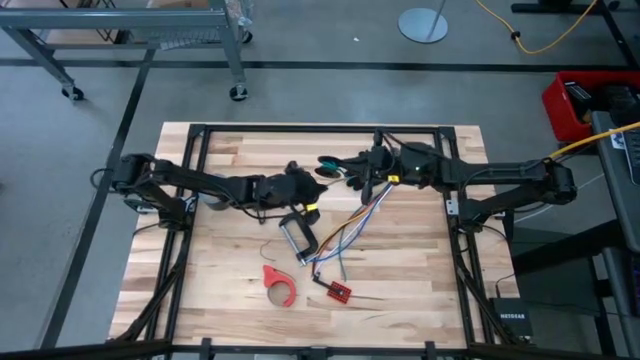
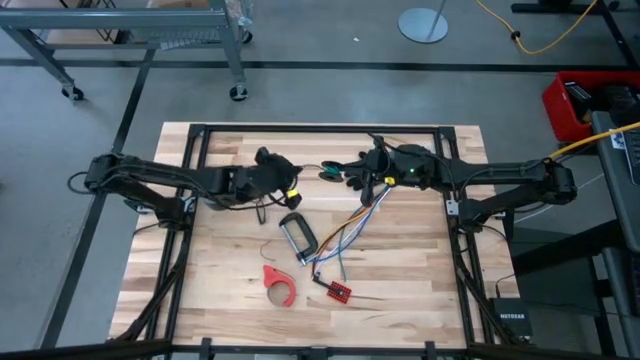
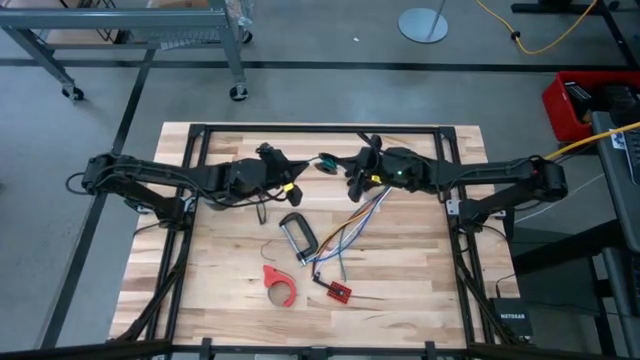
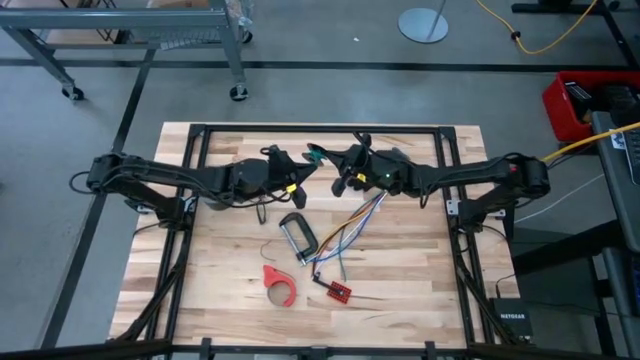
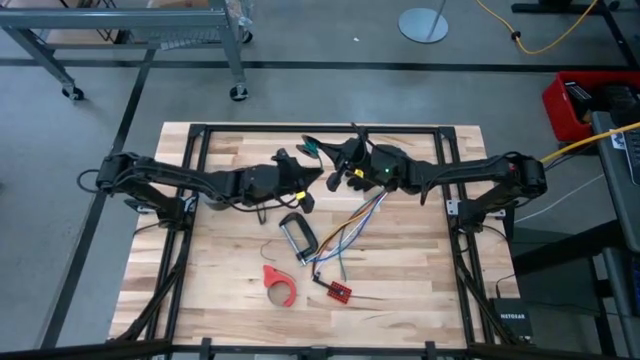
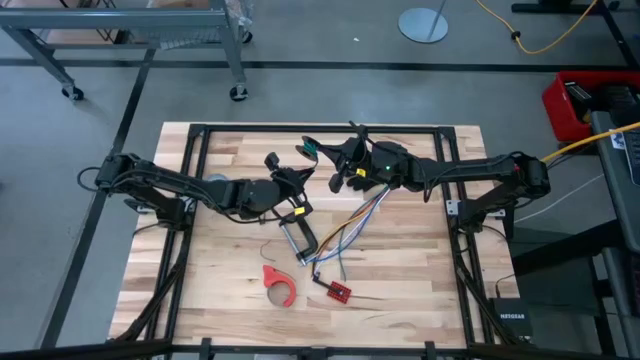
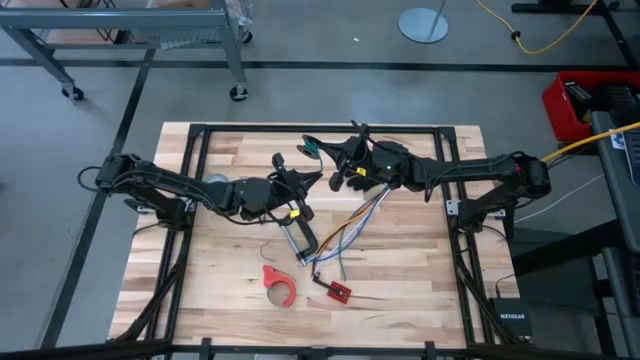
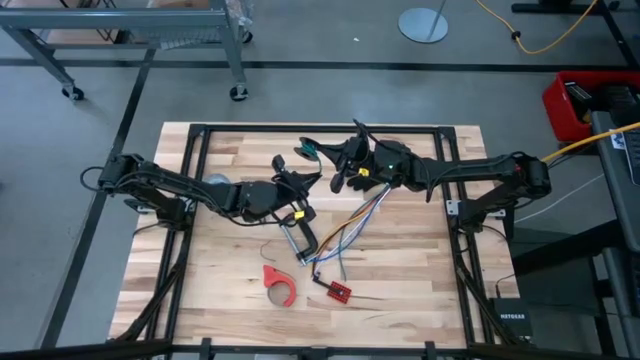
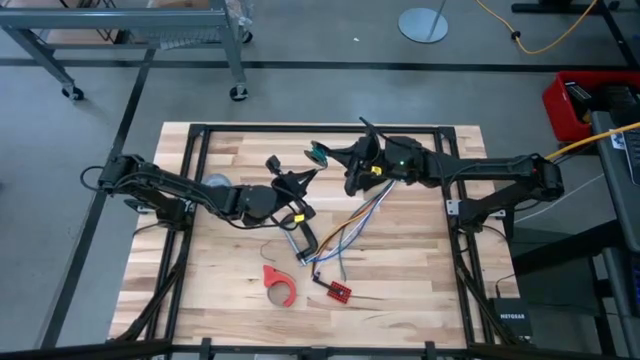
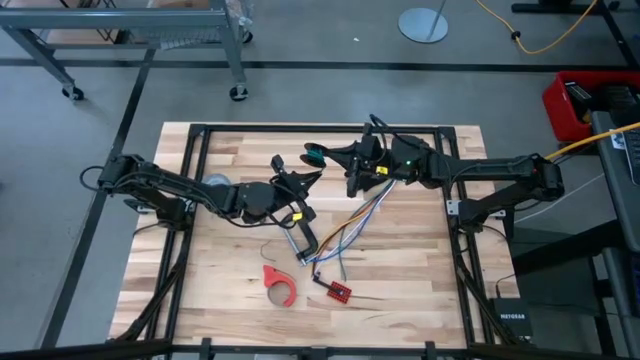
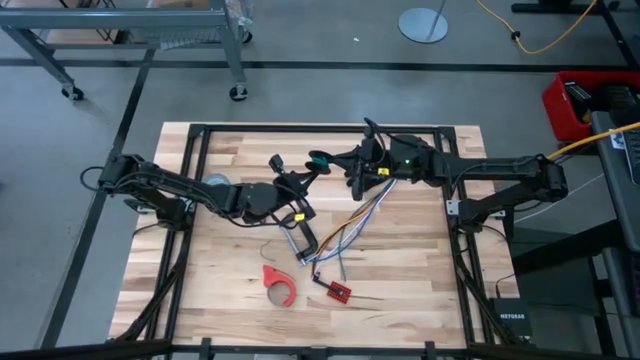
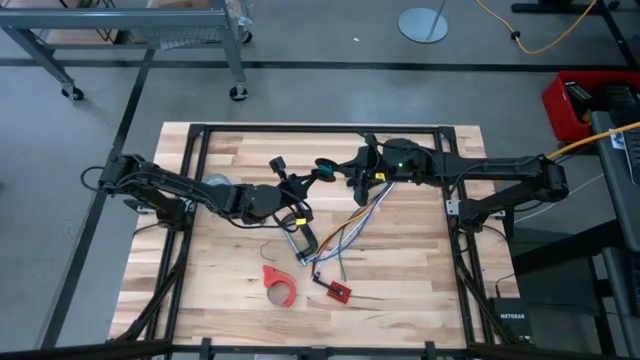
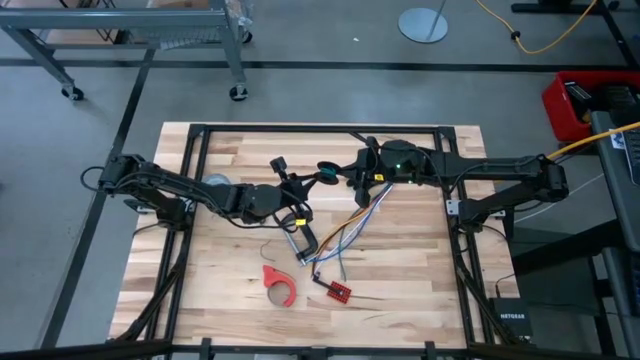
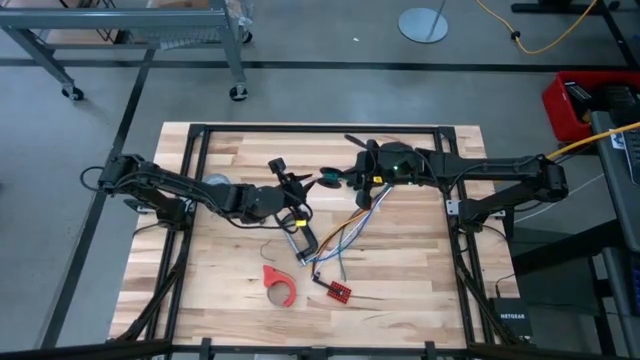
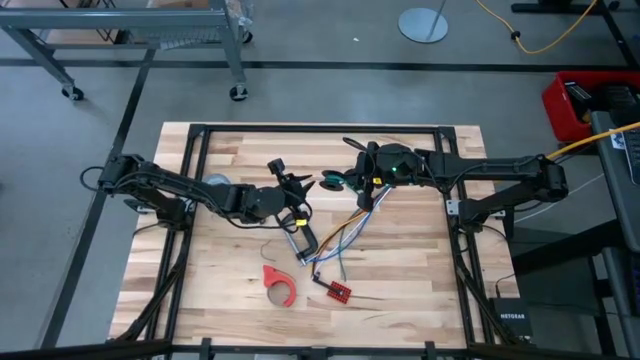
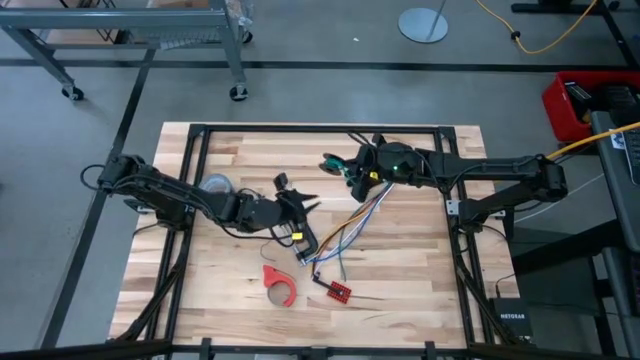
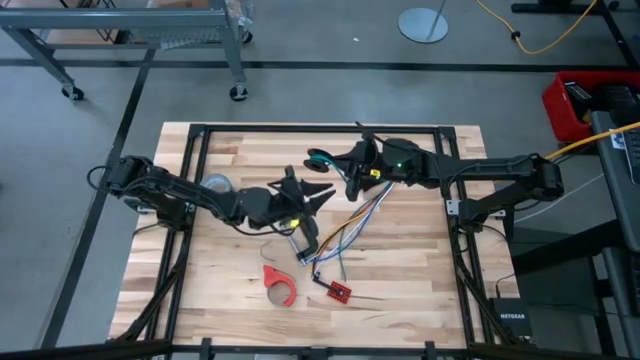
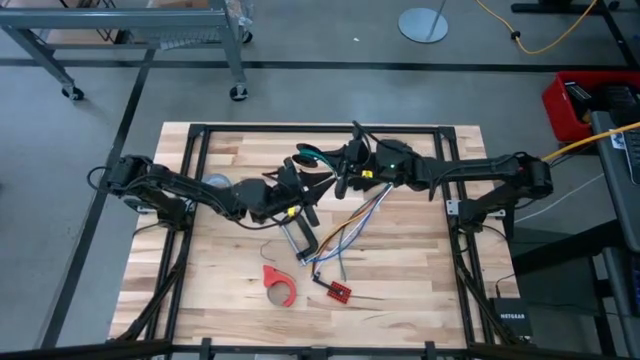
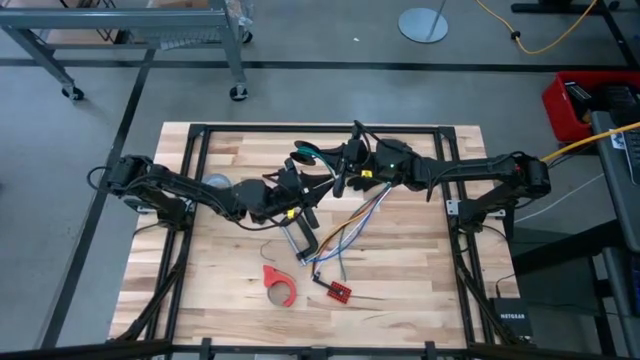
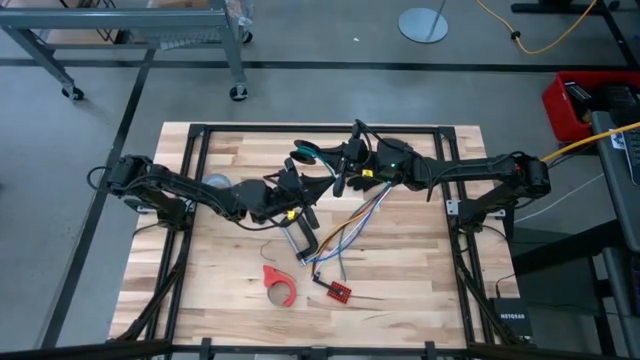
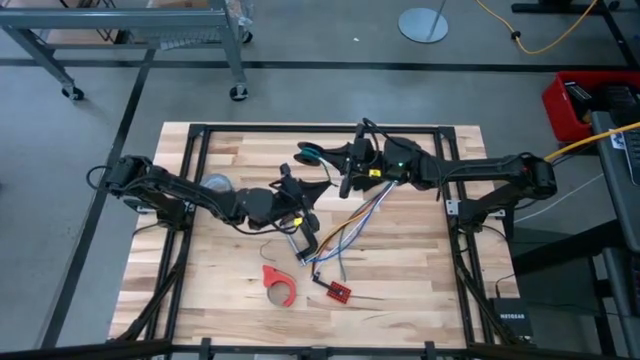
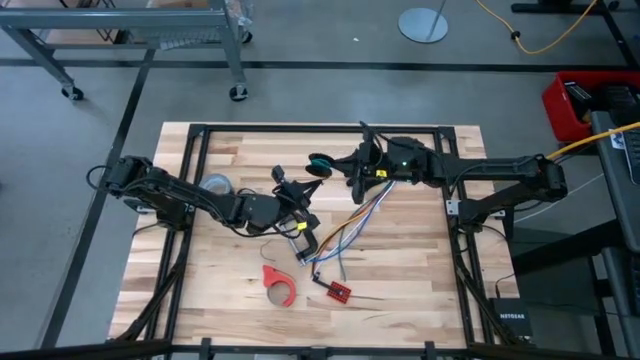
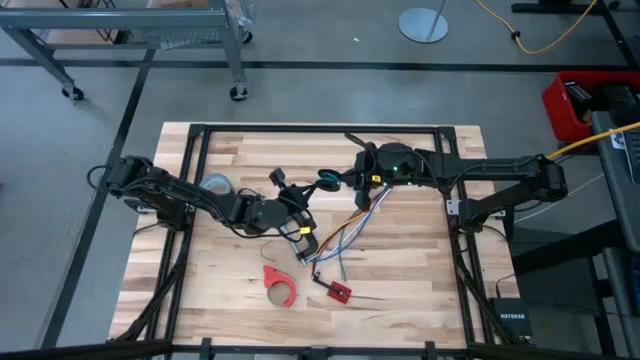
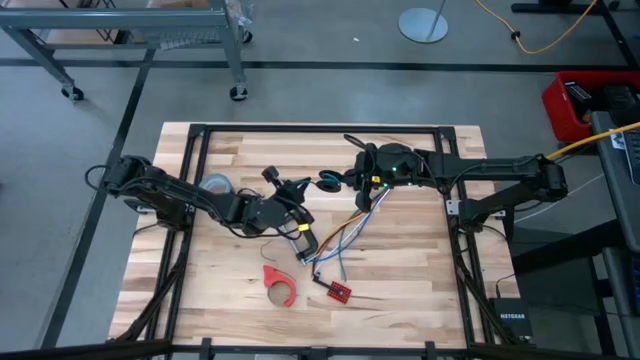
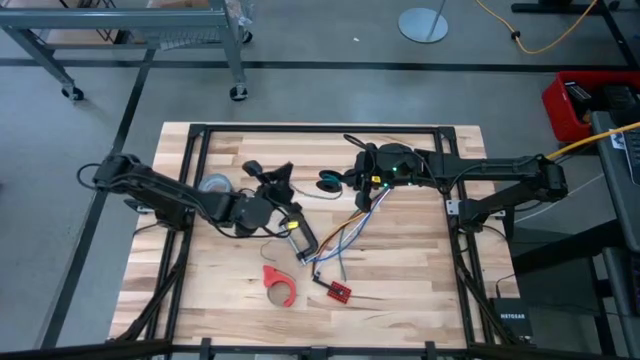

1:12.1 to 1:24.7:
Task: Coil cords
Coil the green wire around the spool

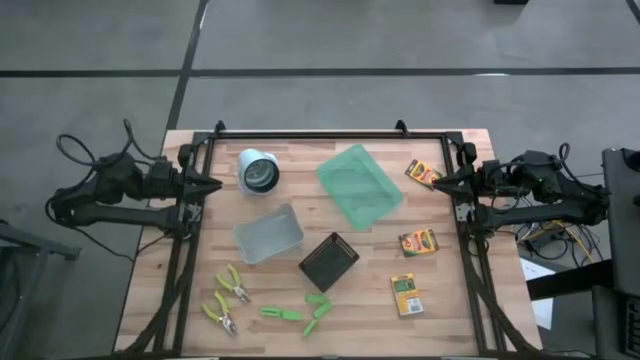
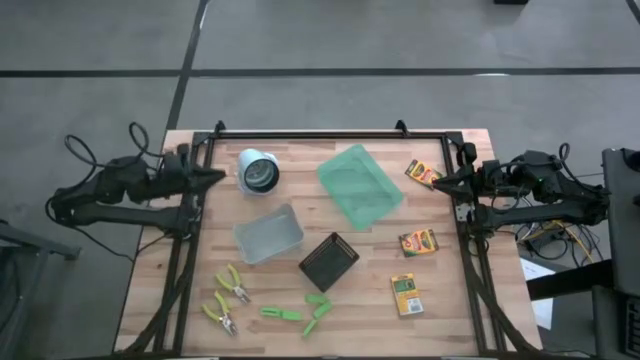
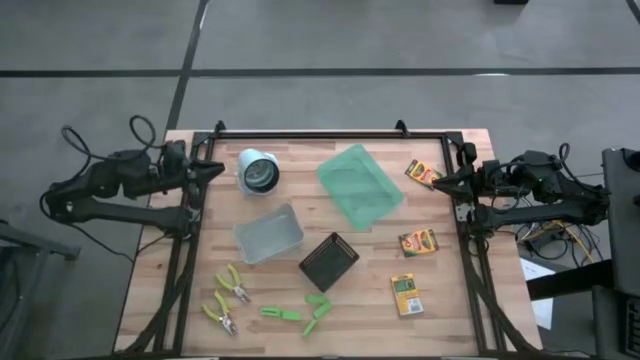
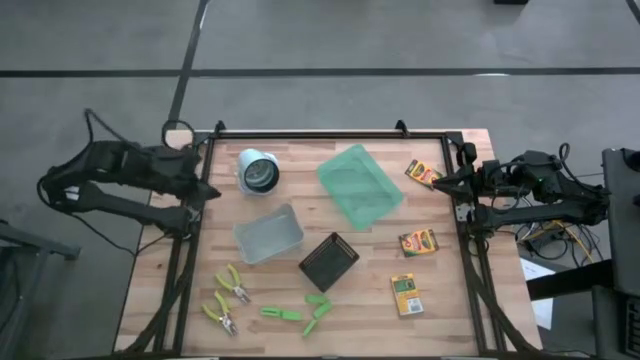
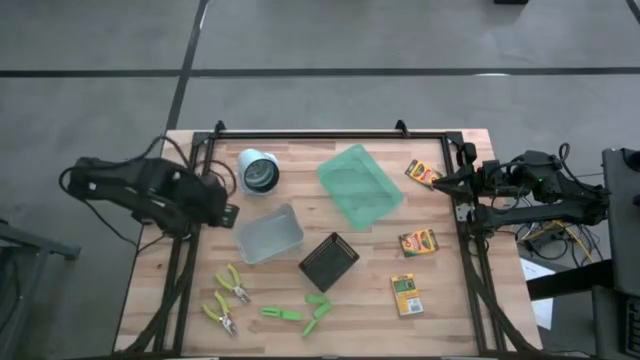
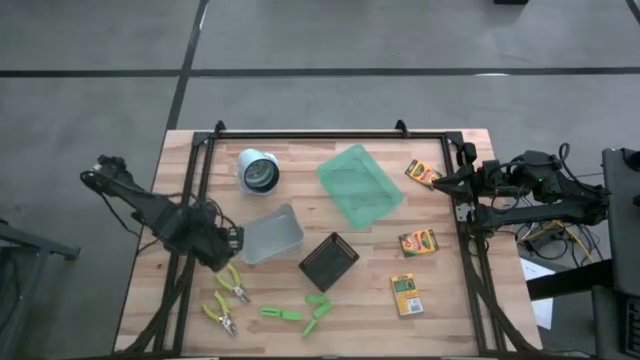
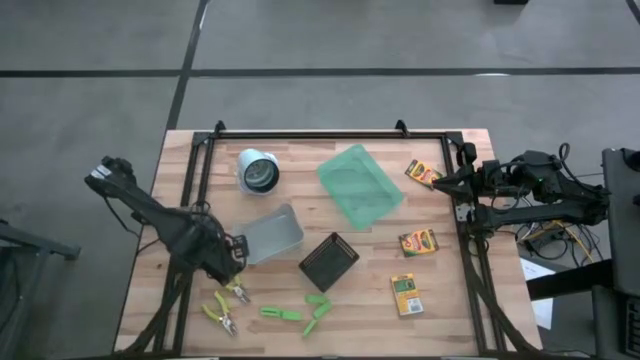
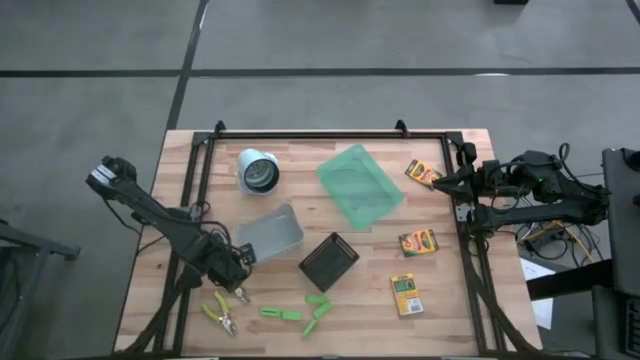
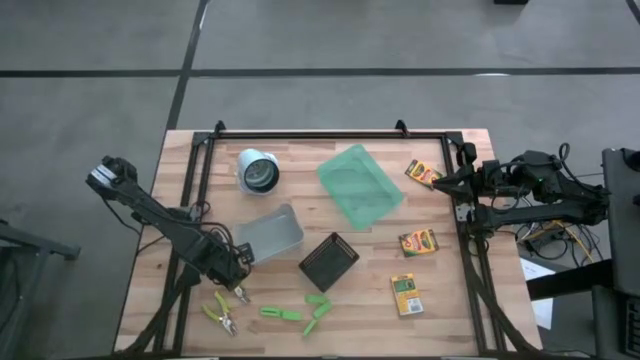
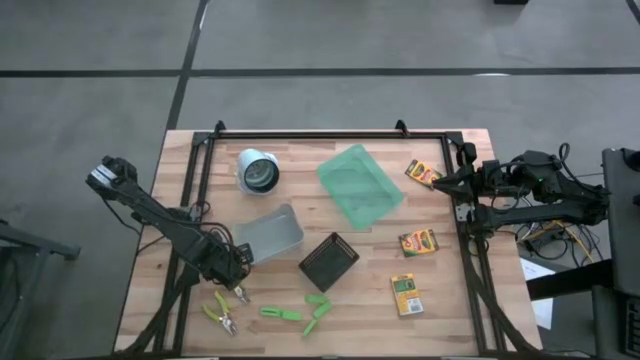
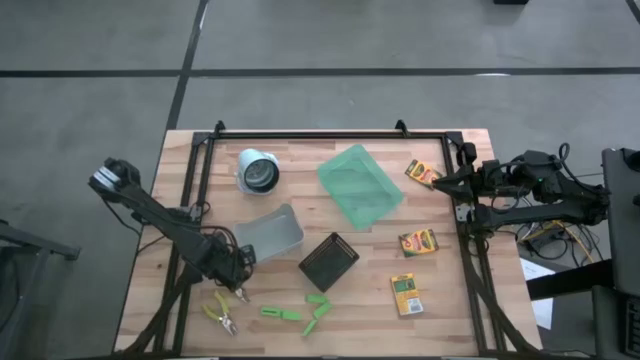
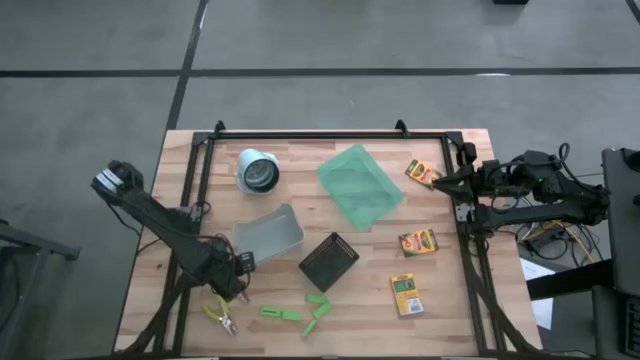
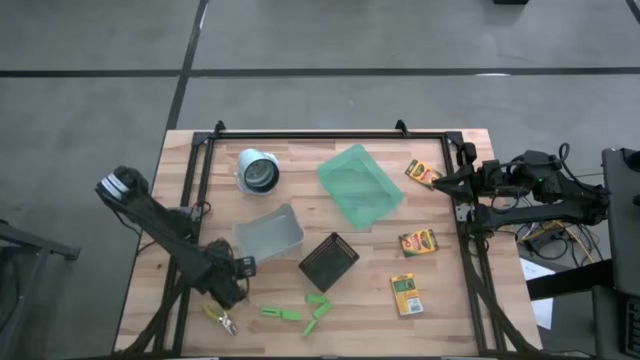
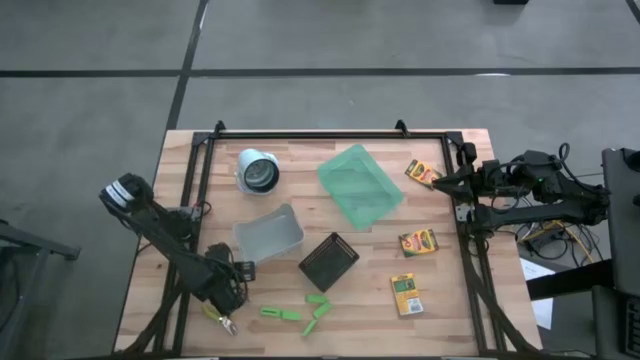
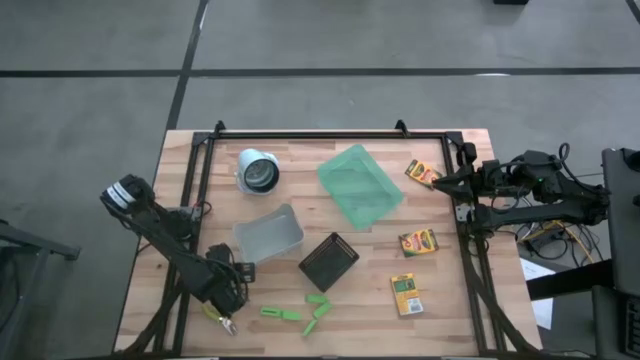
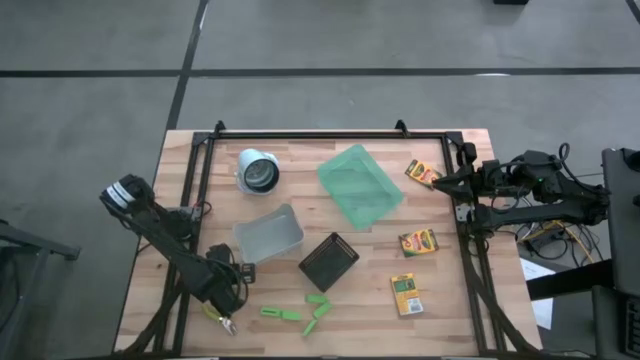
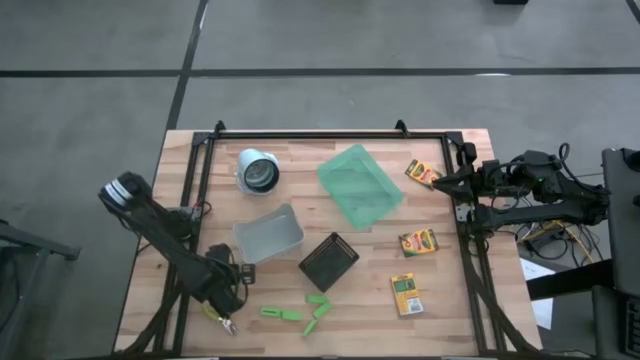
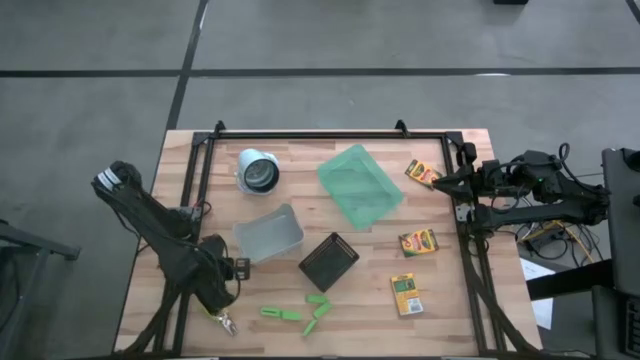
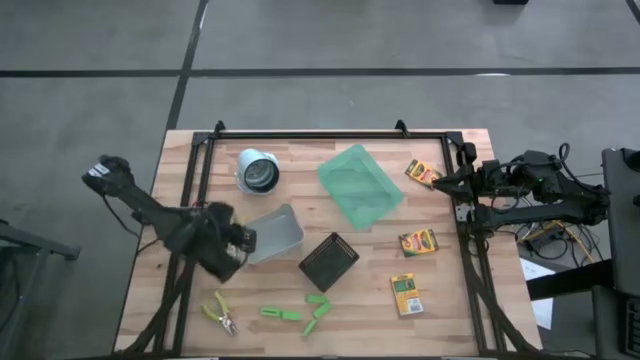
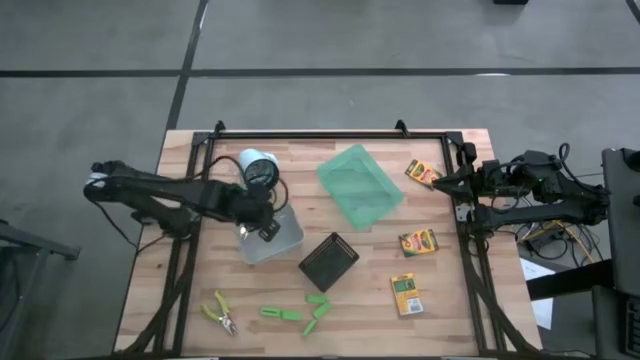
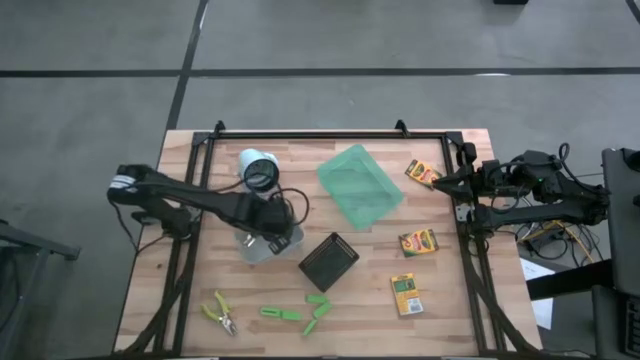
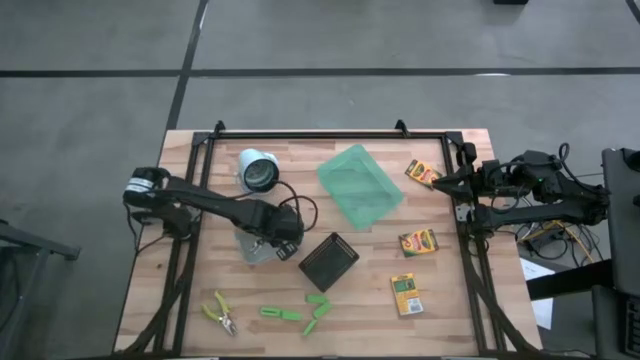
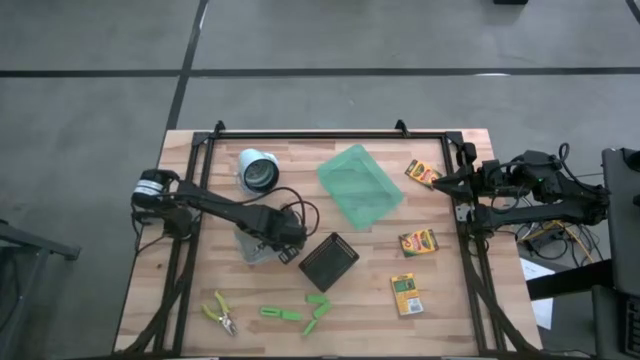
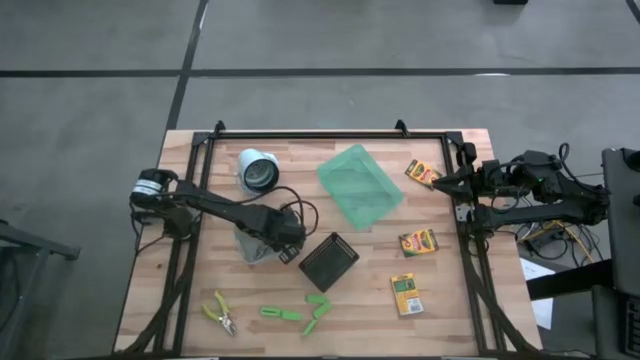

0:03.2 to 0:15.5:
Task: Pick & Place School Supplies
Put the yellow one hole puncher into the gray bin
